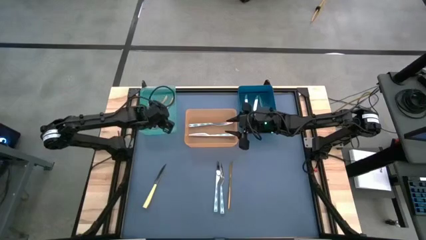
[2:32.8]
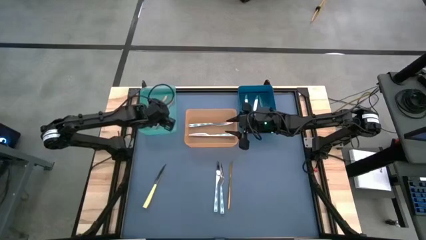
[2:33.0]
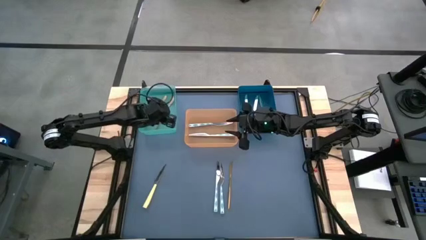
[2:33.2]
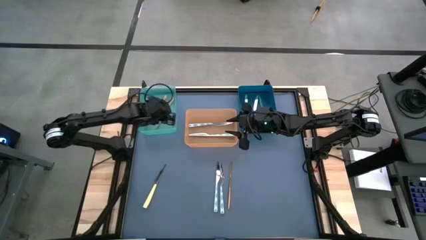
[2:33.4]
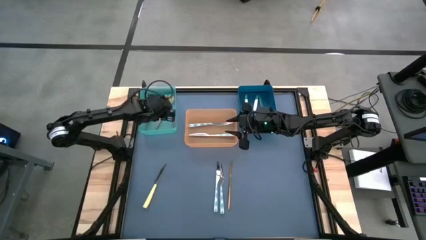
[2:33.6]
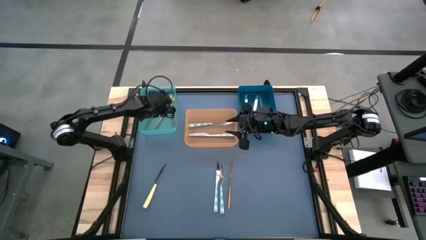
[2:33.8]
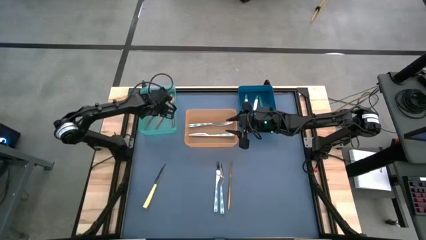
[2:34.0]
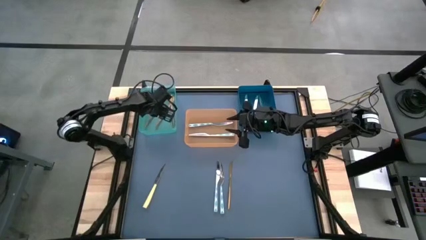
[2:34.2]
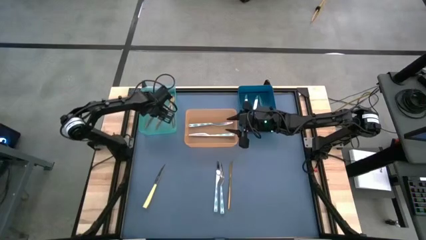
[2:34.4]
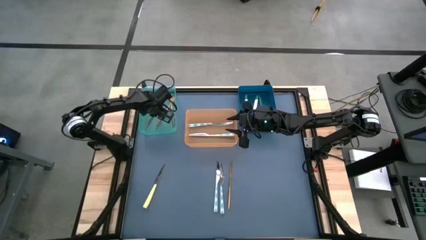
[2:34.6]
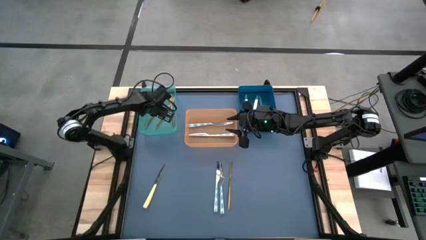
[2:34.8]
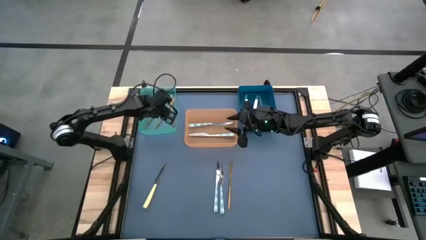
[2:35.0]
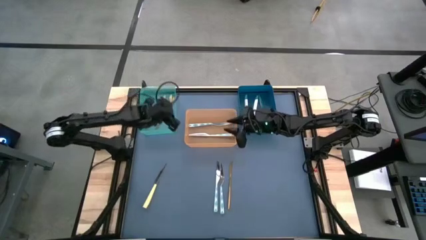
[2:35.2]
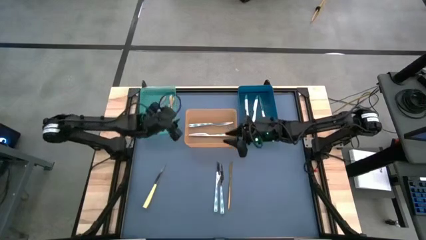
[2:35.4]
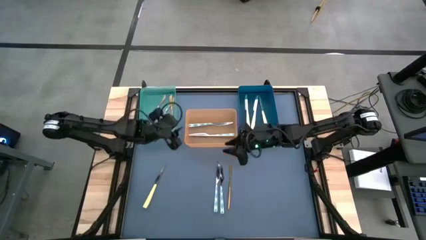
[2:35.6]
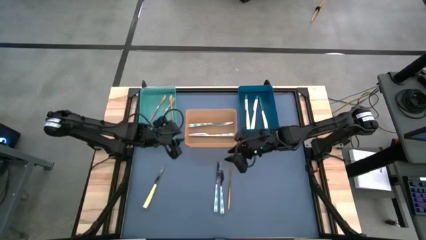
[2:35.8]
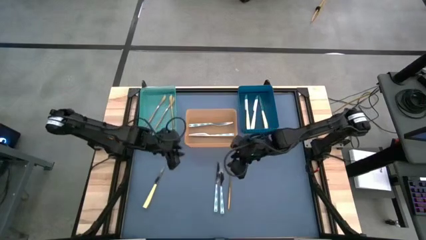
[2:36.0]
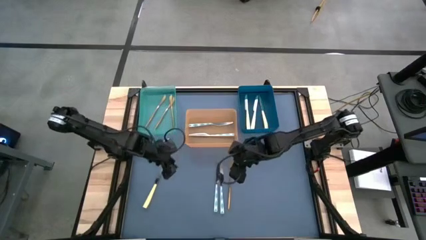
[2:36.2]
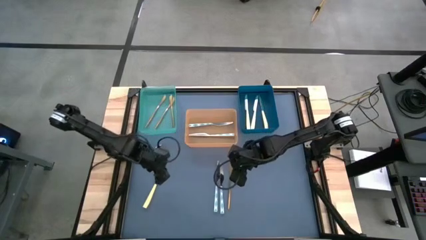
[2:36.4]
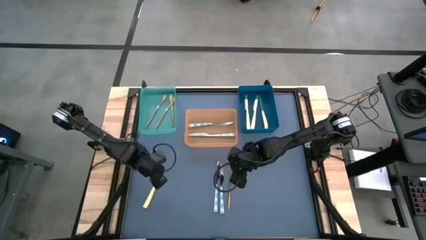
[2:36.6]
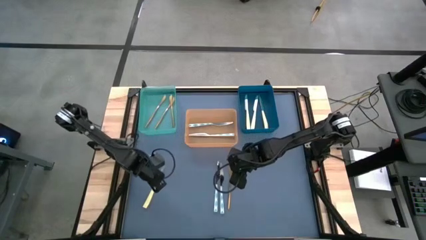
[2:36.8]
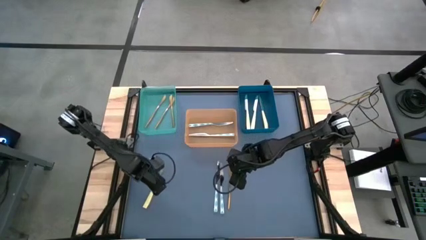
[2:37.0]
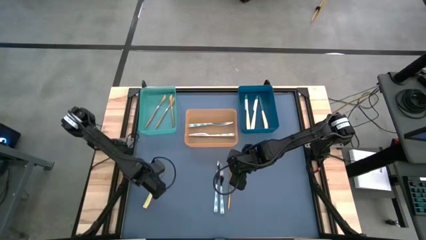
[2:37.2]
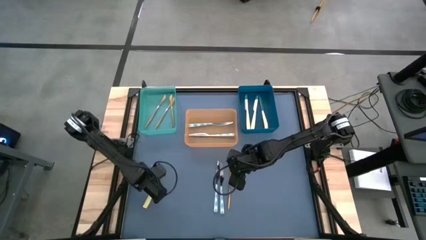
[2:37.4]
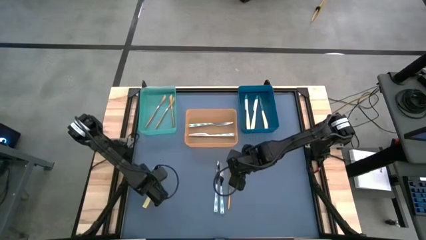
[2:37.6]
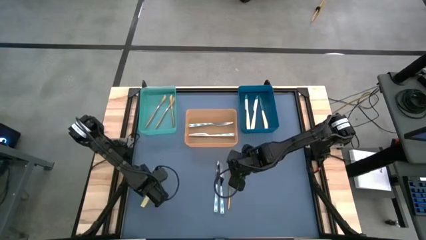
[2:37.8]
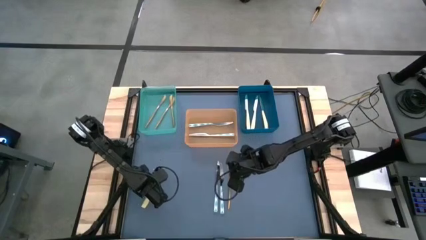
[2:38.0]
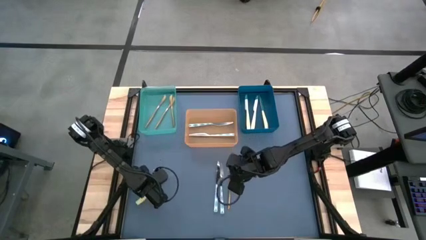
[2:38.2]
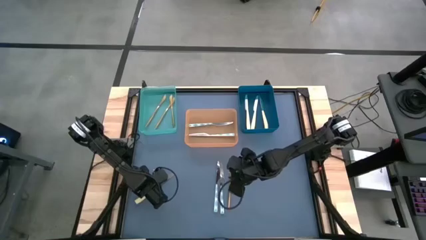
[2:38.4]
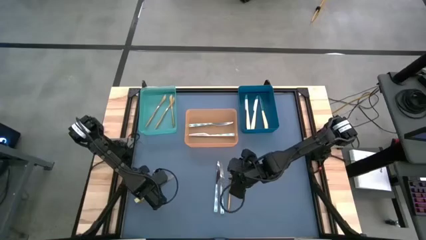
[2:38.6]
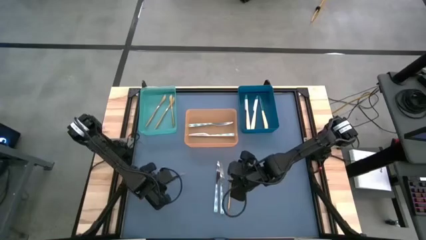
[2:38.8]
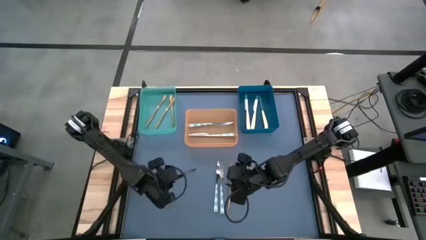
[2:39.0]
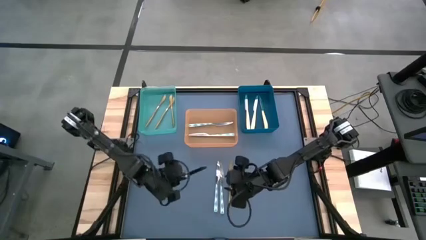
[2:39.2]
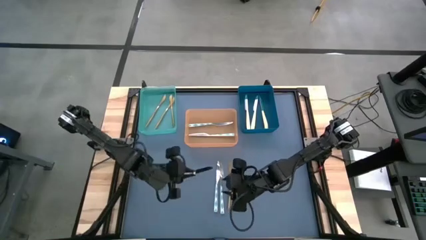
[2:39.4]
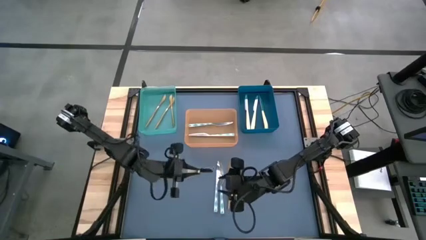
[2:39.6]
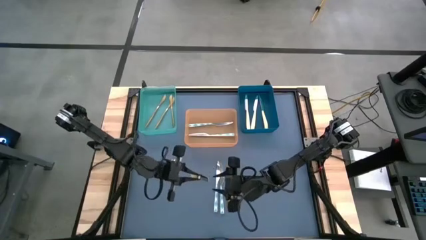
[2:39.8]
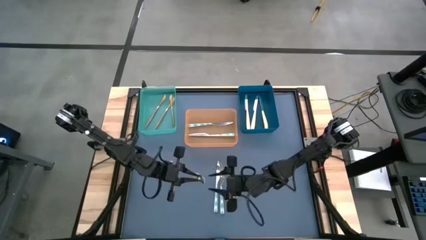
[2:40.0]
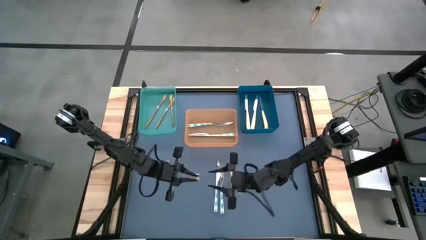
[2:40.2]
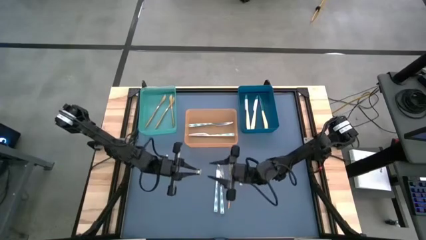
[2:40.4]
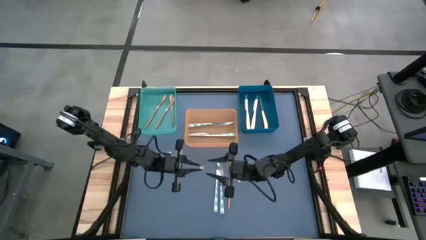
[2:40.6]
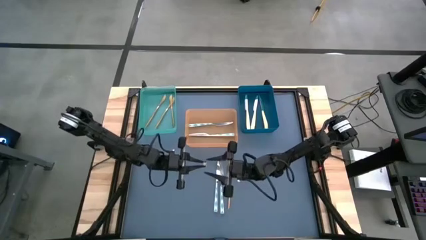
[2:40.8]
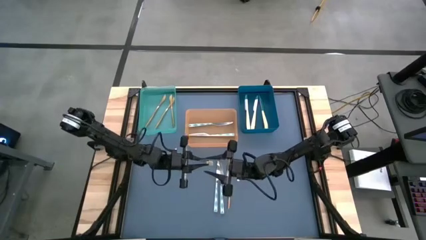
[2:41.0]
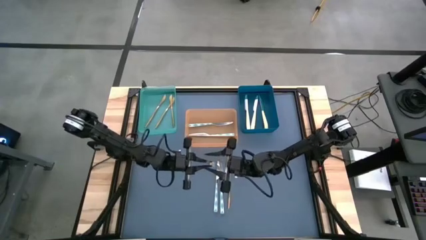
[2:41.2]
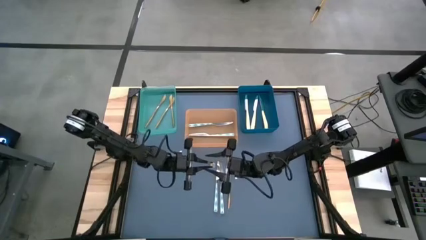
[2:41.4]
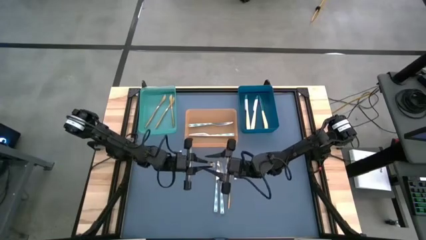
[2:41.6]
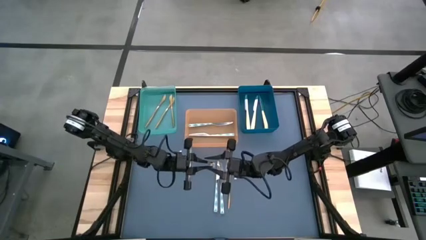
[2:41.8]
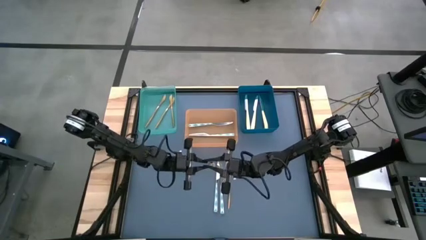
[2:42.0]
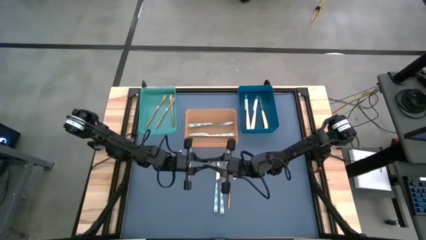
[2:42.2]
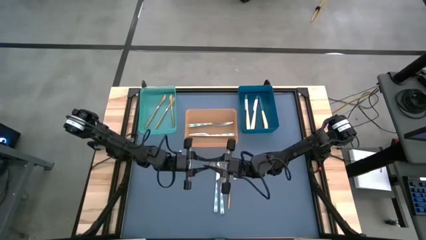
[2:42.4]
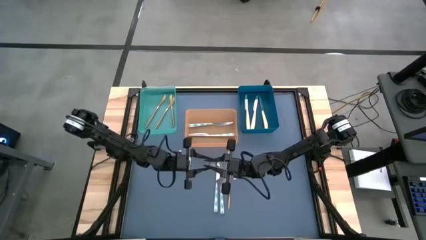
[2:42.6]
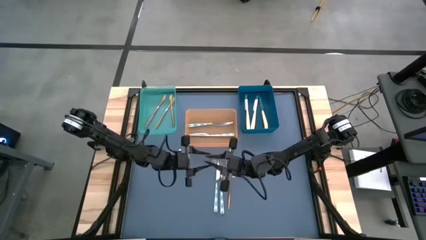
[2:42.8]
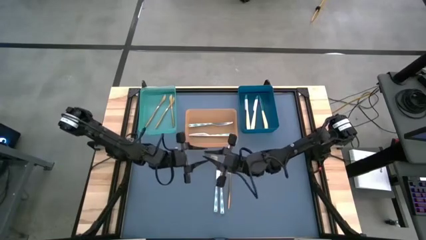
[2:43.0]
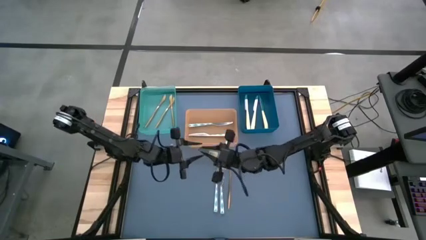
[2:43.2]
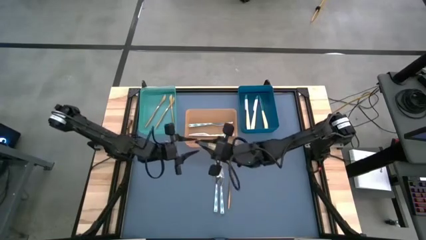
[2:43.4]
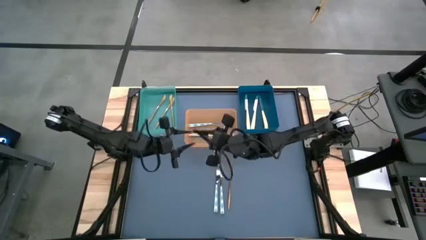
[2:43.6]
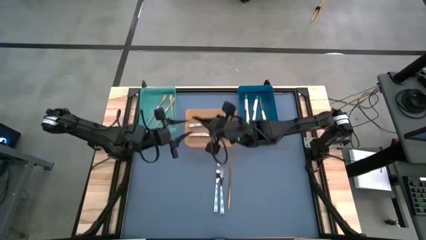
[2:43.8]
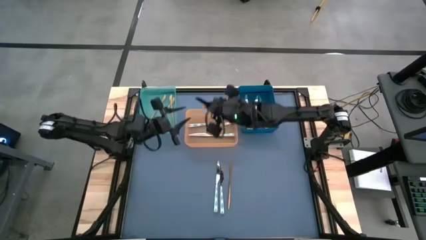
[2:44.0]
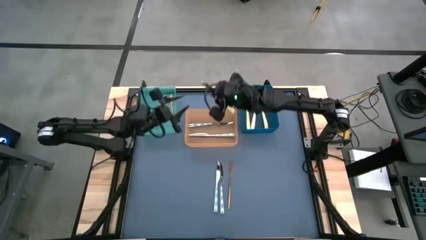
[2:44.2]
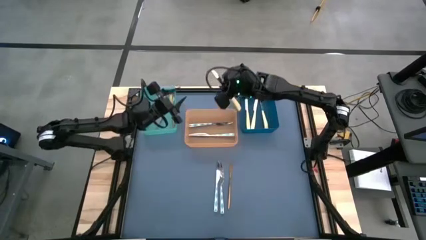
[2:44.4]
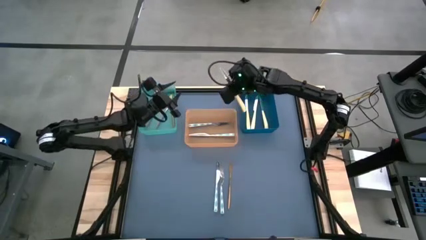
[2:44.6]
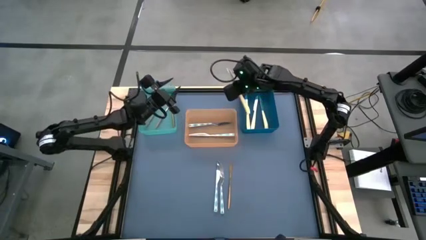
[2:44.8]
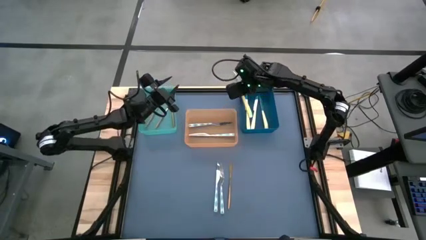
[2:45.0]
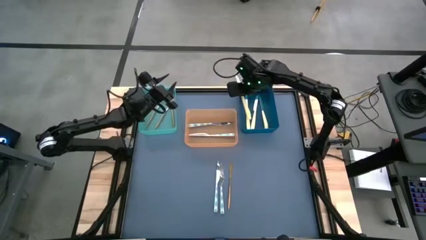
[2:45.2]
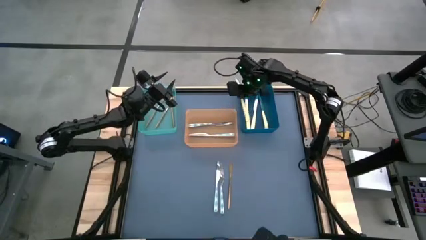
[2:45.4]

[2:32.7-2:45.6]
Task: Sort silverware by color (type)
Put the yellow knife into the blue bin

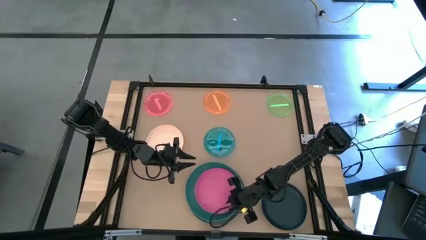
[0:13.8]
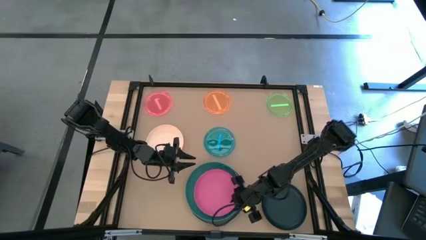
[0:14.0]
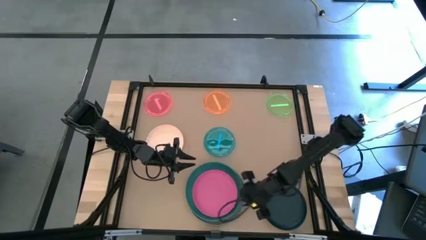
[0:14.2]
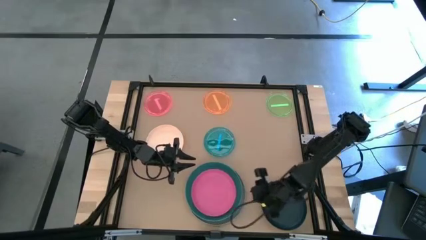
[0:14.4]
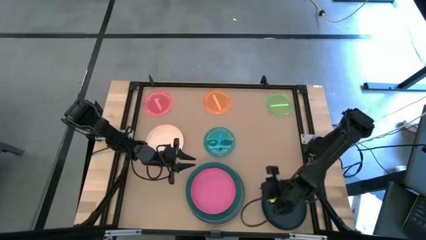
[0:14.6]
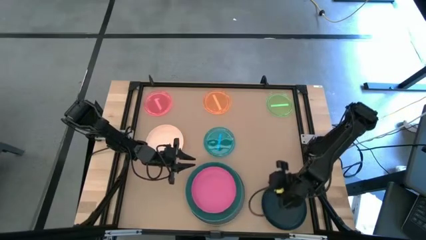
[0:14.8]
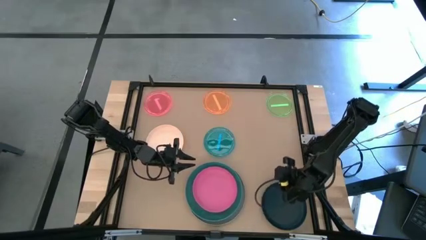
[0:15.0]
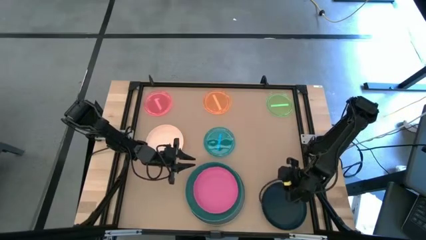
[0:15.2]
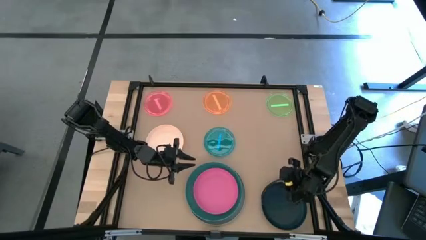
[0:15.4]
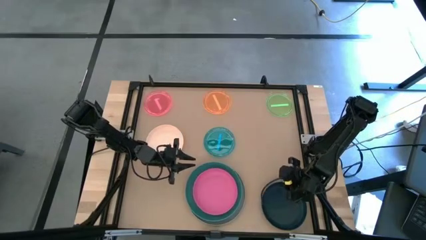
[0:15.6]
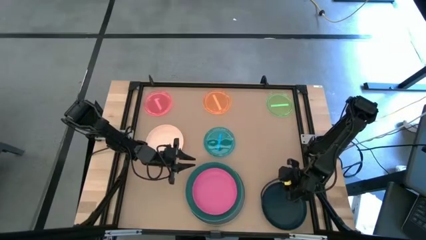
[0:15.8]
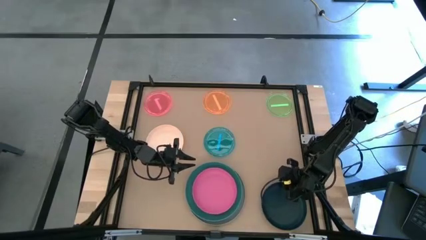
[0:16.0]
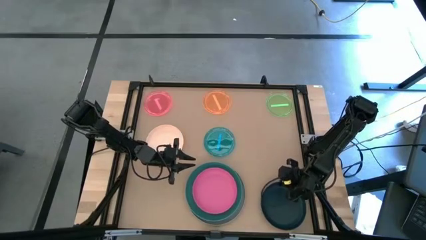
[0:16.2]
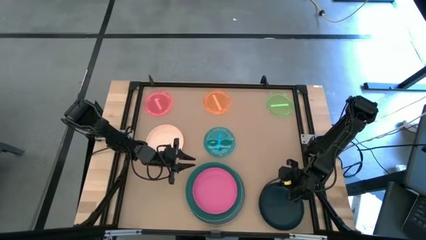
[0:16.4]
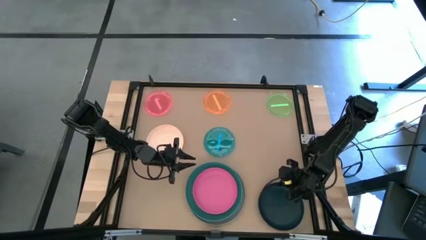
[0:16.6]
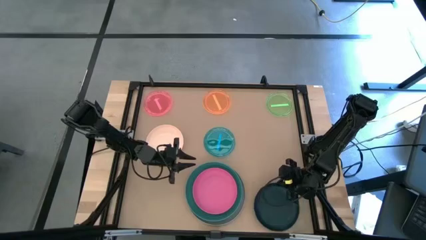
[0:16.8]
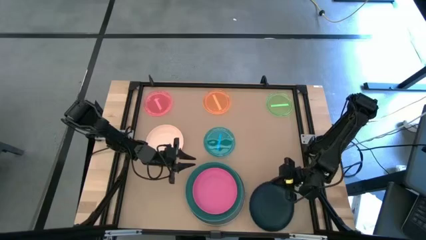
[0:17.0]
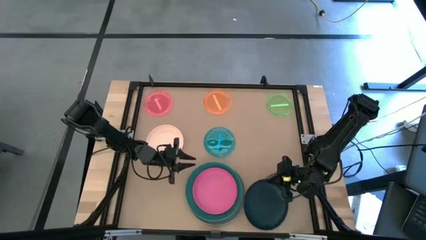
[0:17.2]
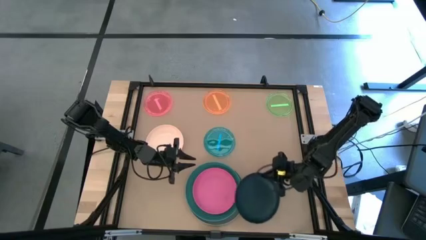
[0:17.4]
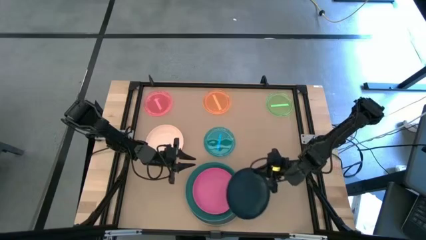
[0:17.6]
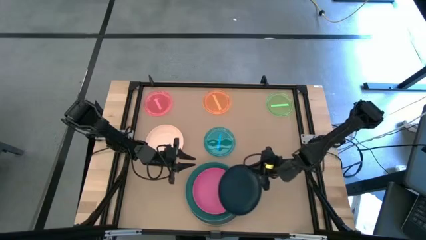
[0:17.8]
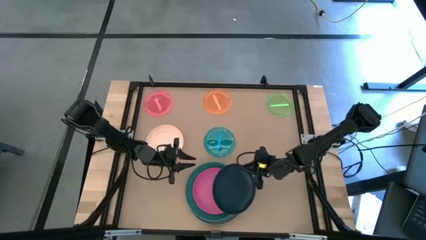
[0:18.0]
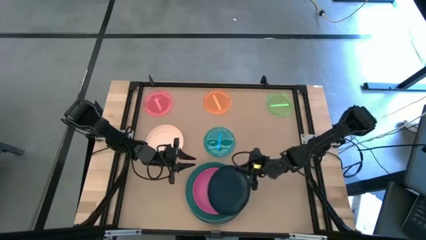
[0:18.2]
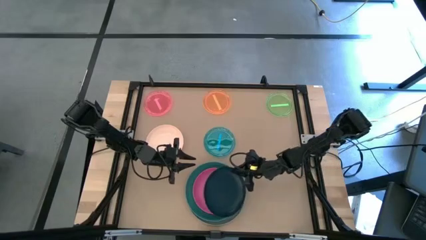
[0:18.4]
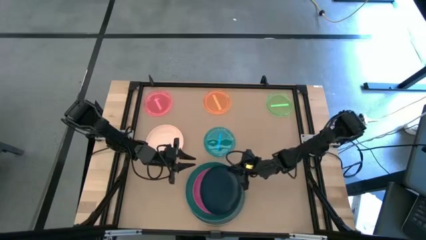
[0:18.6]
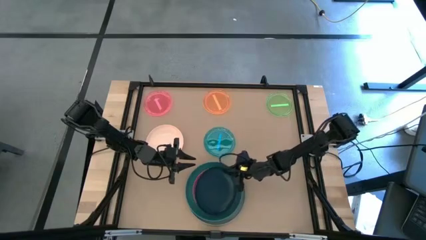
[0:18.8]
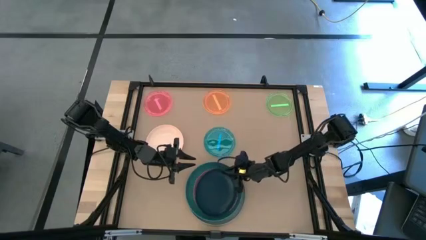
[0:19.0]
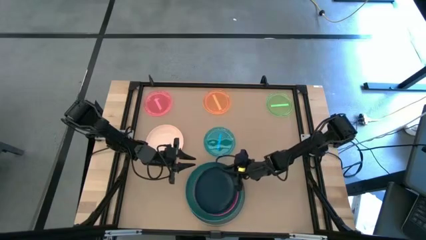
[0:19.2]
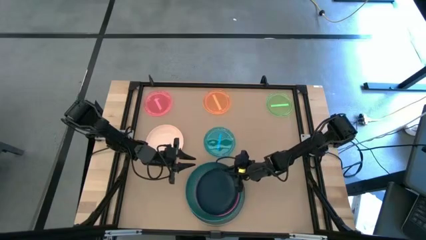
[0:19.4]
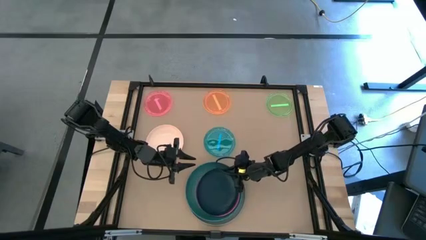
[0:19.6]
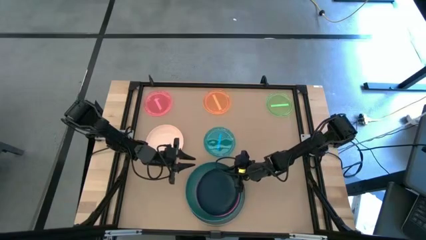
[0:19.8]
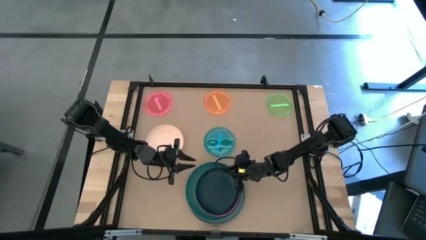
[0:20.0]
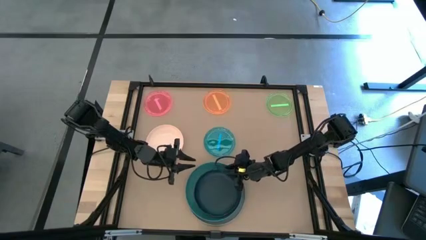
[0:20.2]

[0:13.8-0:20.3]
Task: Stack plastic plates
Stack the black plate on top of the pink plate
